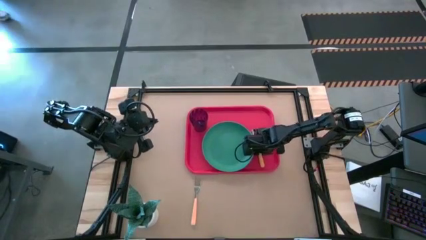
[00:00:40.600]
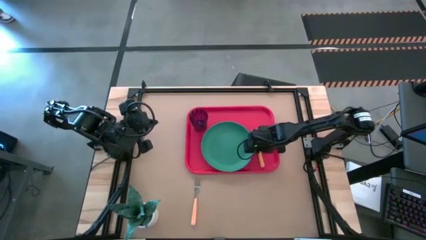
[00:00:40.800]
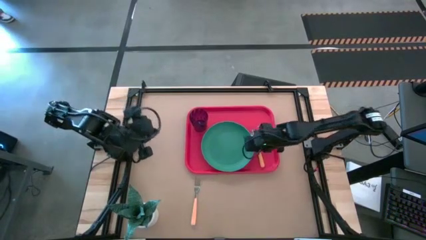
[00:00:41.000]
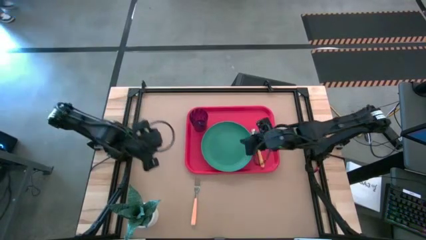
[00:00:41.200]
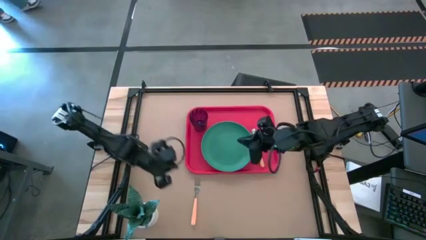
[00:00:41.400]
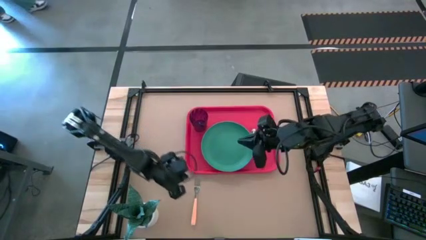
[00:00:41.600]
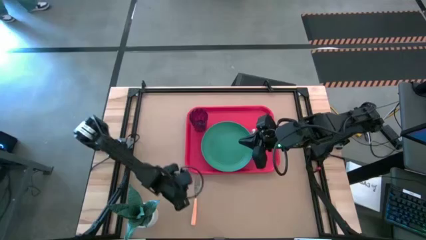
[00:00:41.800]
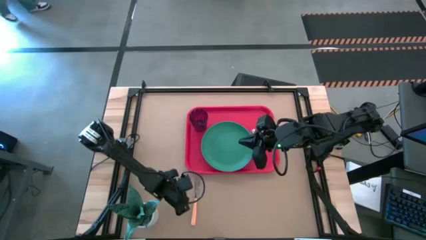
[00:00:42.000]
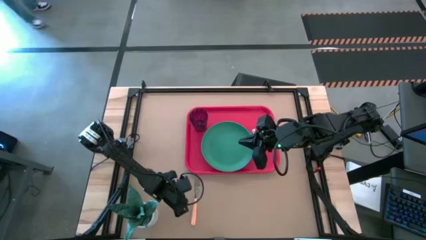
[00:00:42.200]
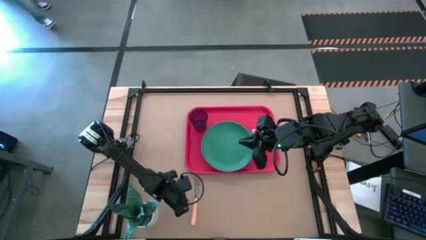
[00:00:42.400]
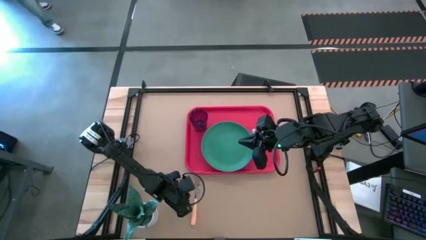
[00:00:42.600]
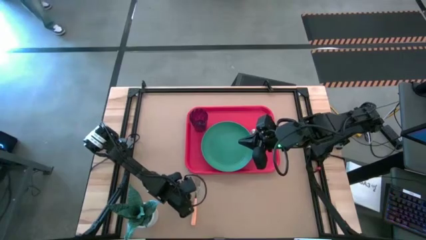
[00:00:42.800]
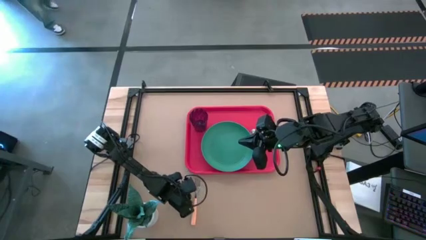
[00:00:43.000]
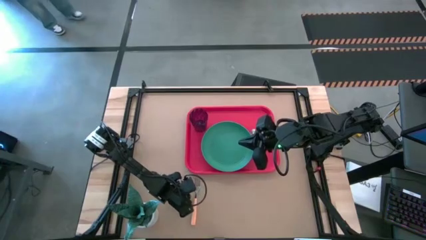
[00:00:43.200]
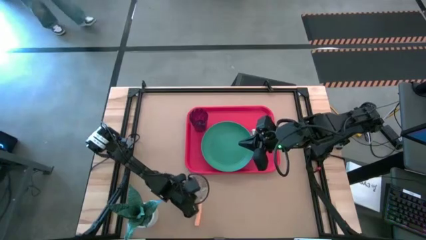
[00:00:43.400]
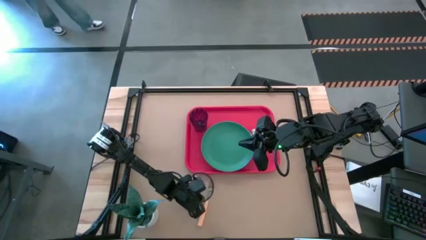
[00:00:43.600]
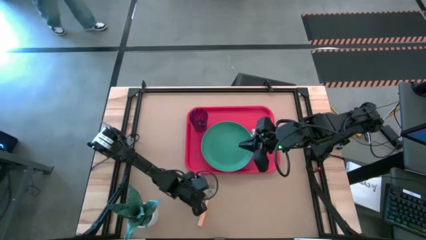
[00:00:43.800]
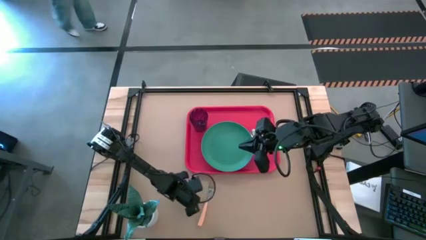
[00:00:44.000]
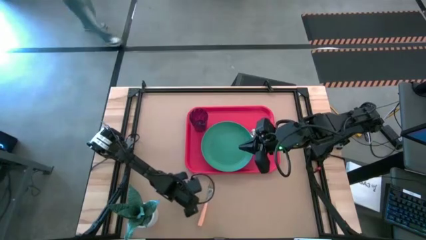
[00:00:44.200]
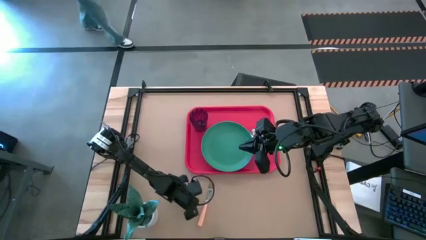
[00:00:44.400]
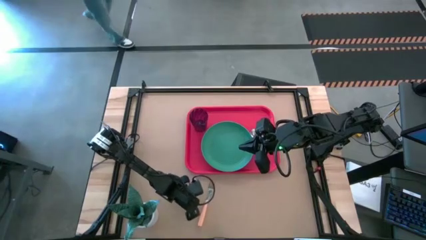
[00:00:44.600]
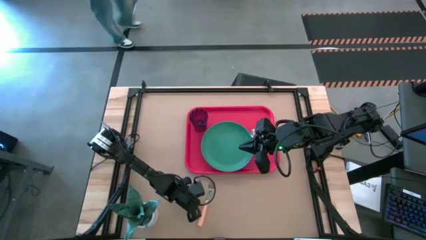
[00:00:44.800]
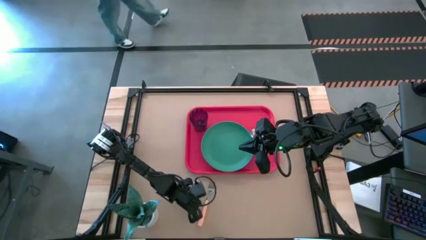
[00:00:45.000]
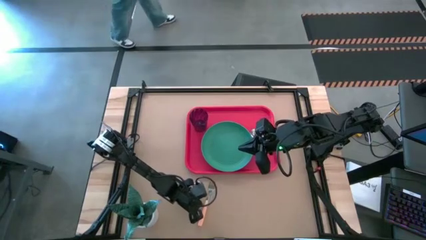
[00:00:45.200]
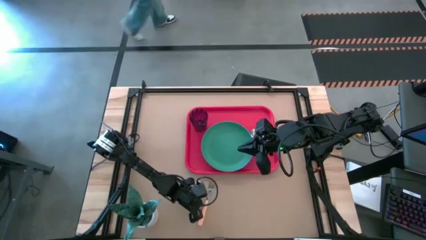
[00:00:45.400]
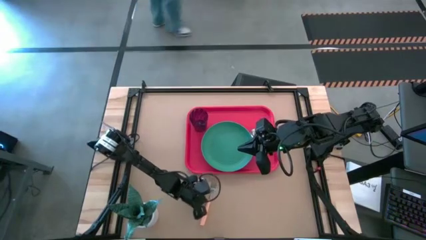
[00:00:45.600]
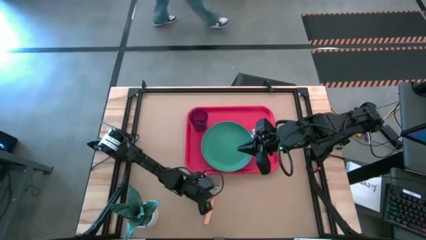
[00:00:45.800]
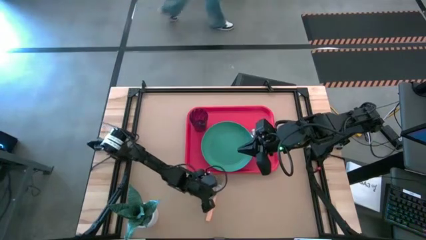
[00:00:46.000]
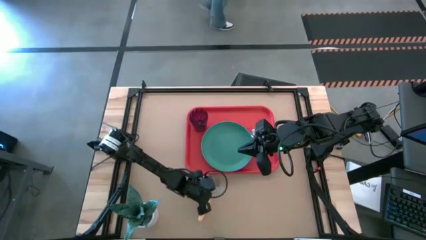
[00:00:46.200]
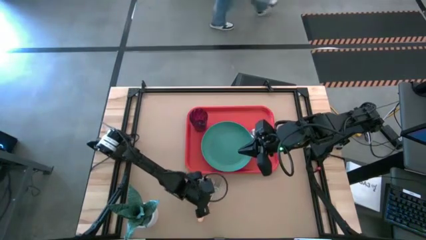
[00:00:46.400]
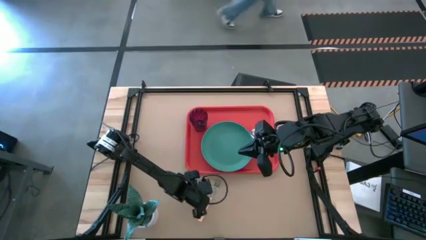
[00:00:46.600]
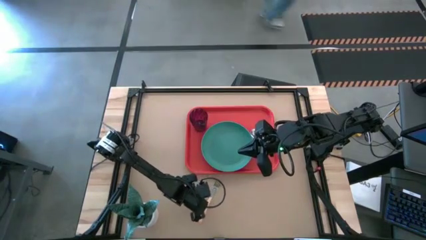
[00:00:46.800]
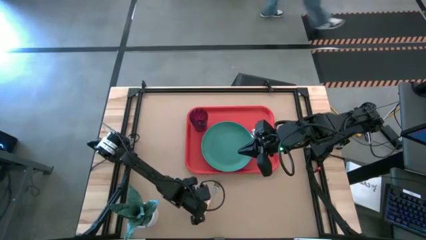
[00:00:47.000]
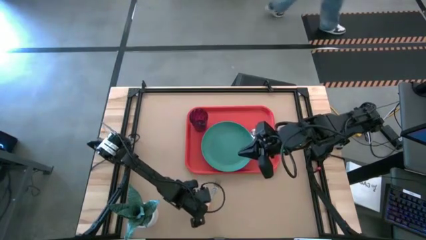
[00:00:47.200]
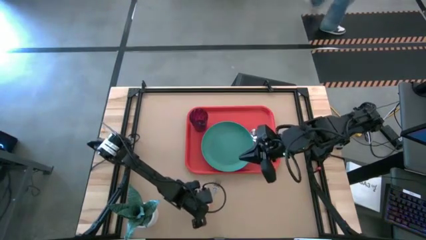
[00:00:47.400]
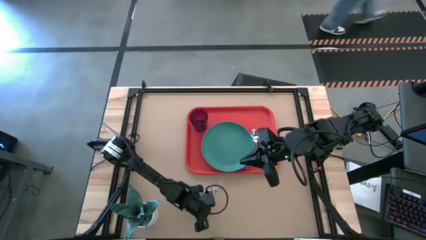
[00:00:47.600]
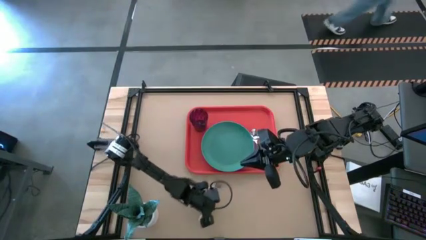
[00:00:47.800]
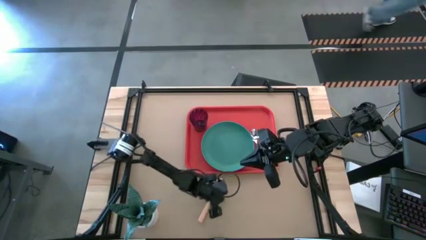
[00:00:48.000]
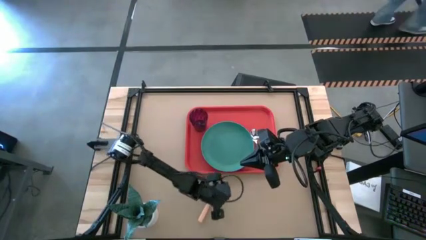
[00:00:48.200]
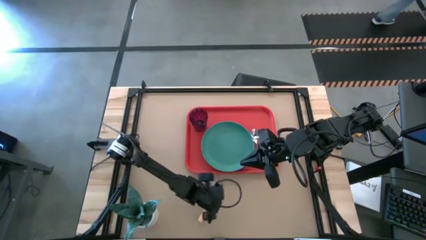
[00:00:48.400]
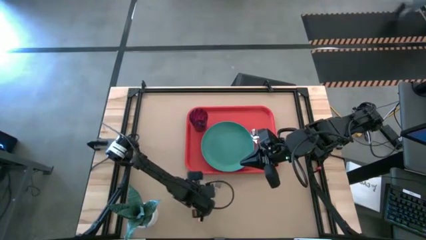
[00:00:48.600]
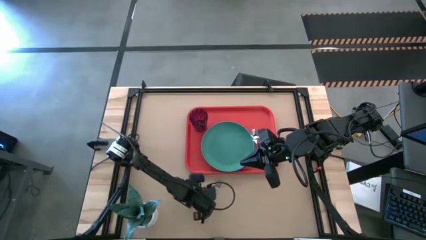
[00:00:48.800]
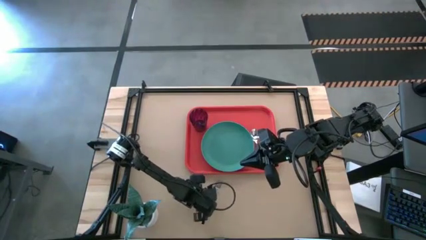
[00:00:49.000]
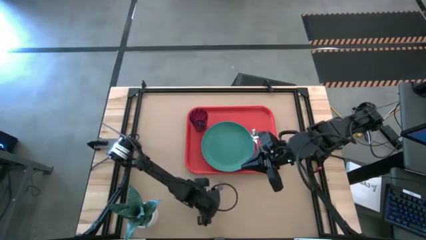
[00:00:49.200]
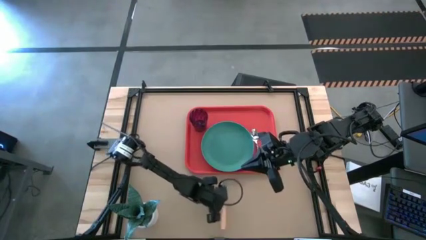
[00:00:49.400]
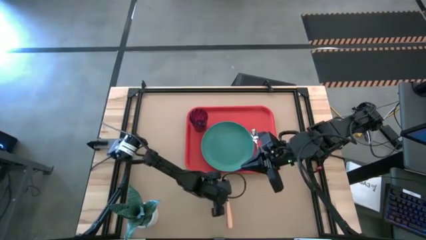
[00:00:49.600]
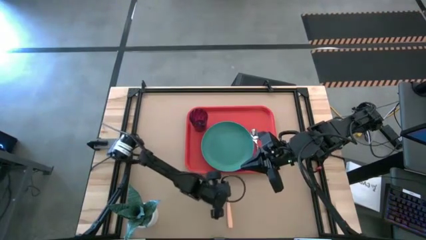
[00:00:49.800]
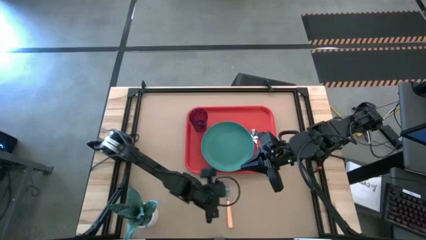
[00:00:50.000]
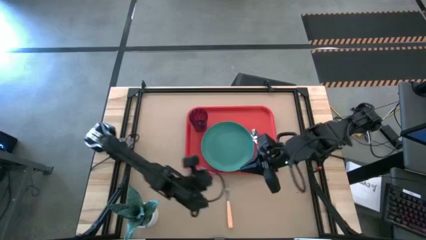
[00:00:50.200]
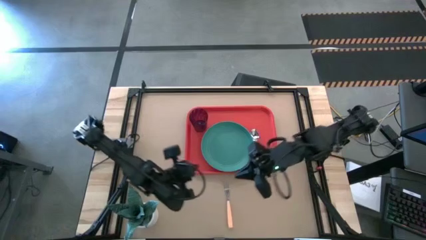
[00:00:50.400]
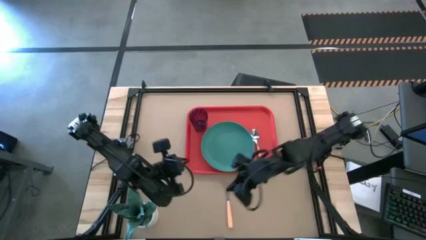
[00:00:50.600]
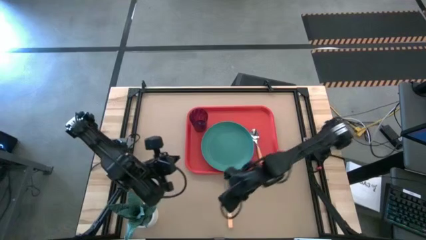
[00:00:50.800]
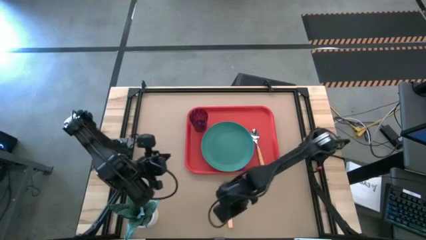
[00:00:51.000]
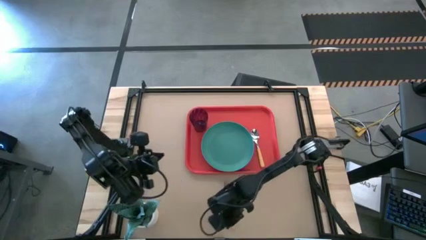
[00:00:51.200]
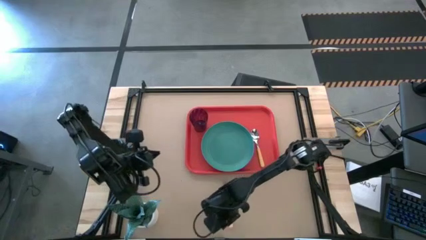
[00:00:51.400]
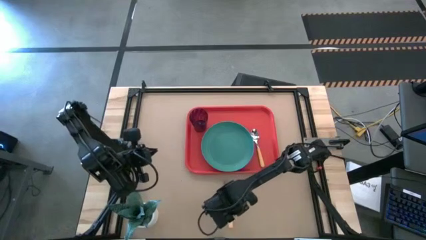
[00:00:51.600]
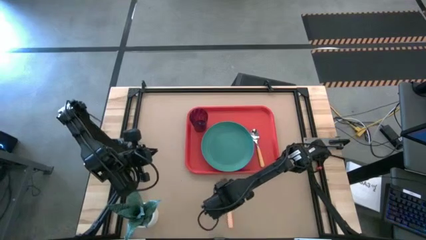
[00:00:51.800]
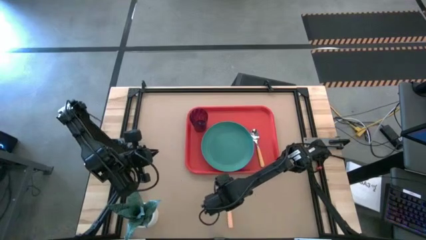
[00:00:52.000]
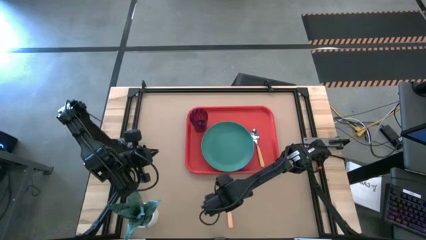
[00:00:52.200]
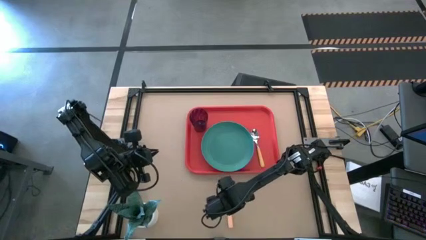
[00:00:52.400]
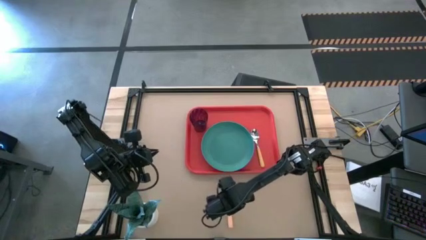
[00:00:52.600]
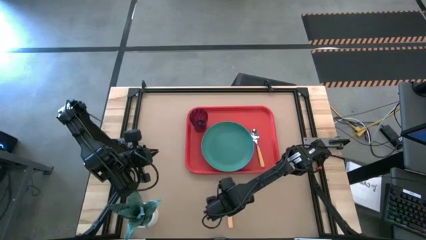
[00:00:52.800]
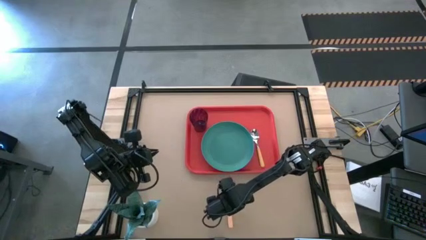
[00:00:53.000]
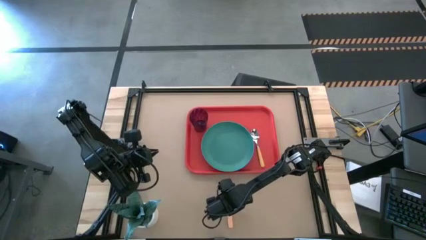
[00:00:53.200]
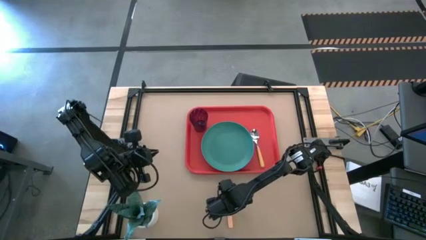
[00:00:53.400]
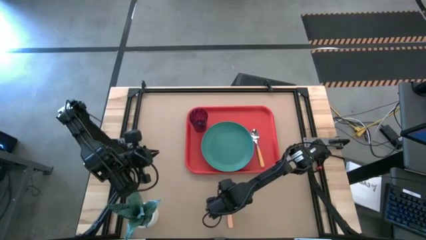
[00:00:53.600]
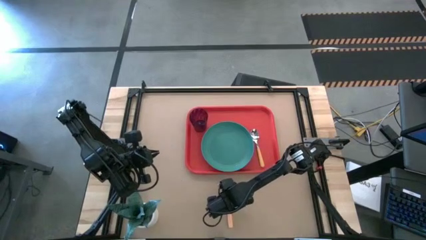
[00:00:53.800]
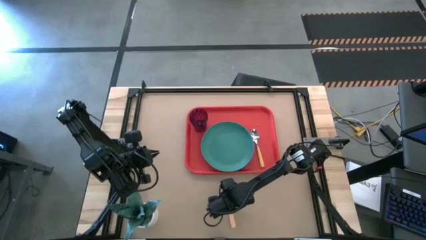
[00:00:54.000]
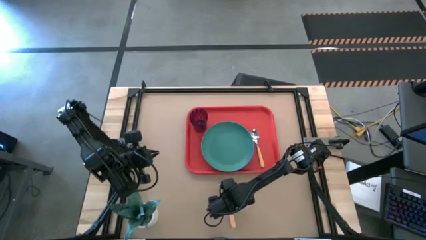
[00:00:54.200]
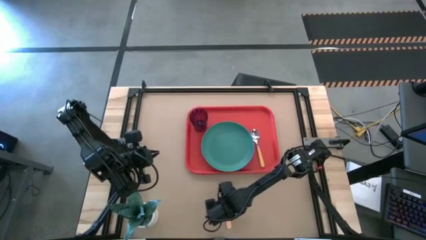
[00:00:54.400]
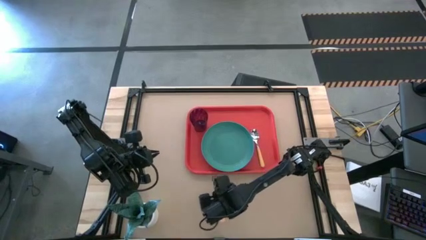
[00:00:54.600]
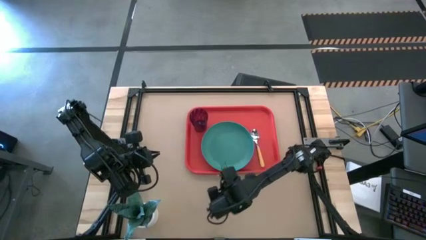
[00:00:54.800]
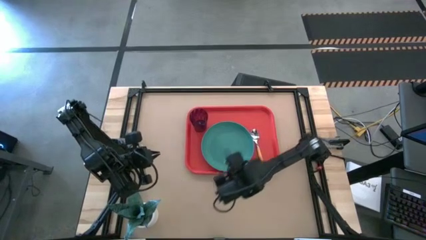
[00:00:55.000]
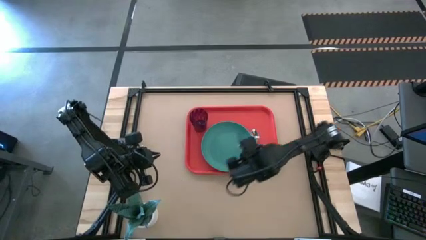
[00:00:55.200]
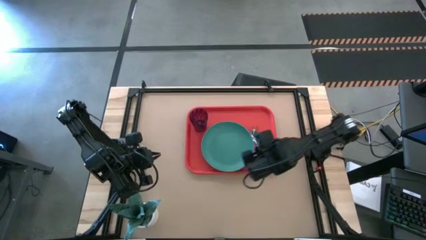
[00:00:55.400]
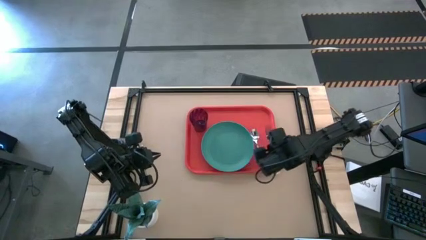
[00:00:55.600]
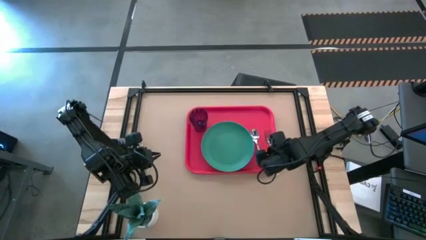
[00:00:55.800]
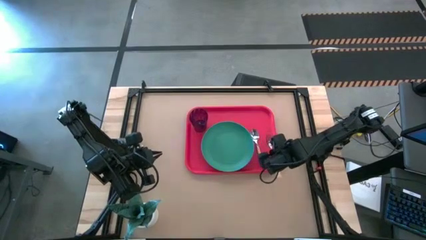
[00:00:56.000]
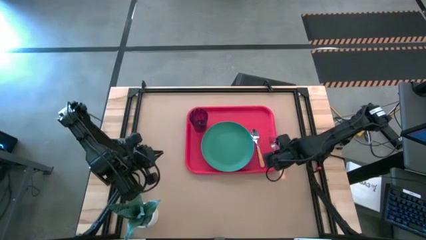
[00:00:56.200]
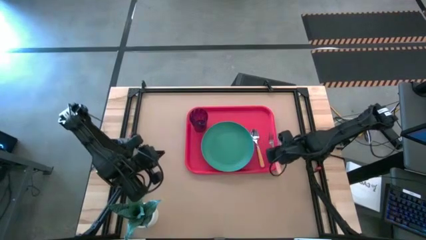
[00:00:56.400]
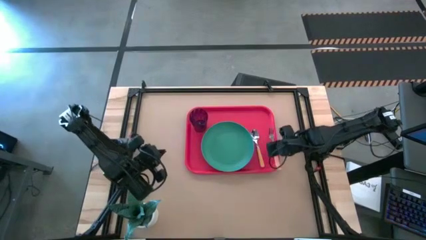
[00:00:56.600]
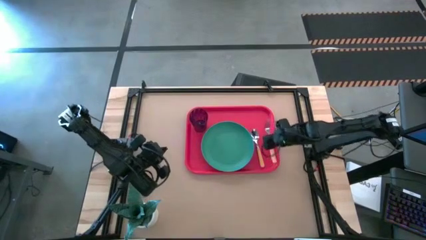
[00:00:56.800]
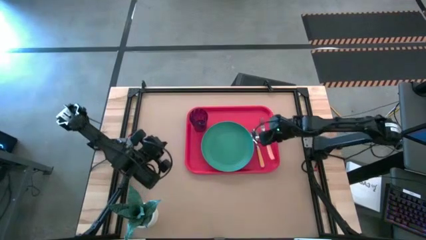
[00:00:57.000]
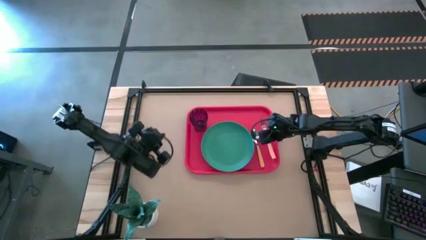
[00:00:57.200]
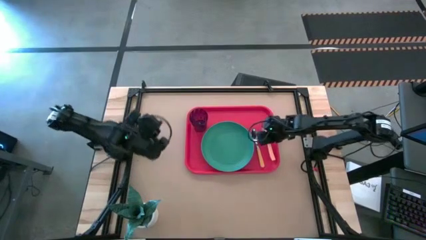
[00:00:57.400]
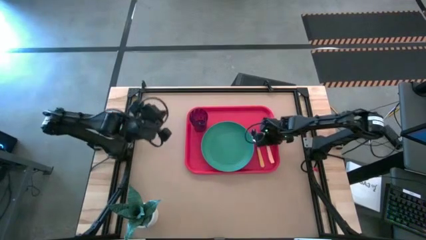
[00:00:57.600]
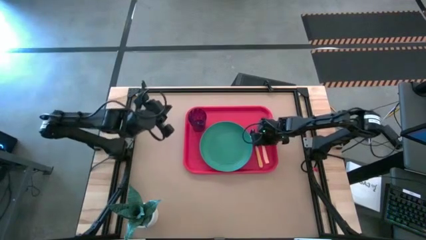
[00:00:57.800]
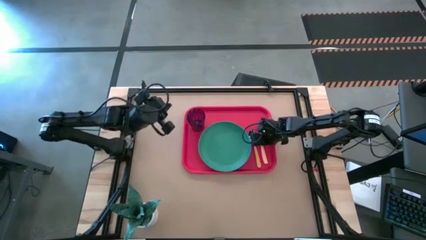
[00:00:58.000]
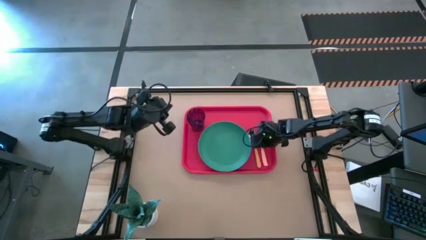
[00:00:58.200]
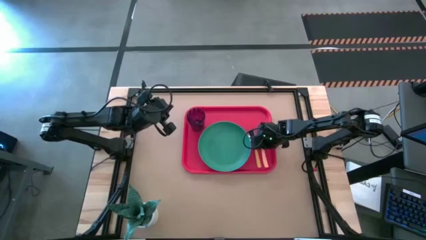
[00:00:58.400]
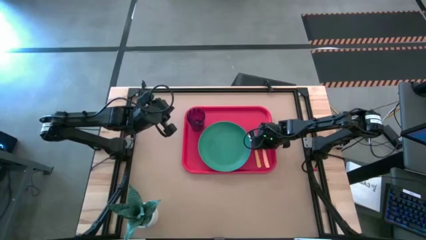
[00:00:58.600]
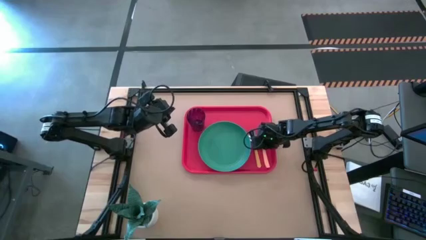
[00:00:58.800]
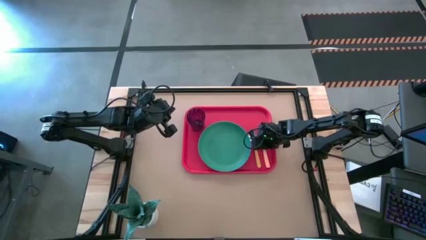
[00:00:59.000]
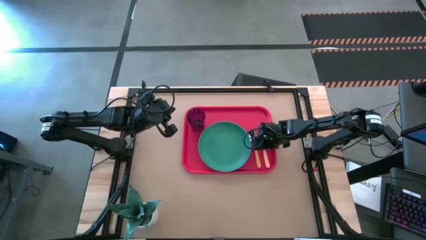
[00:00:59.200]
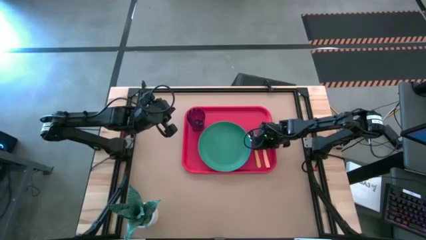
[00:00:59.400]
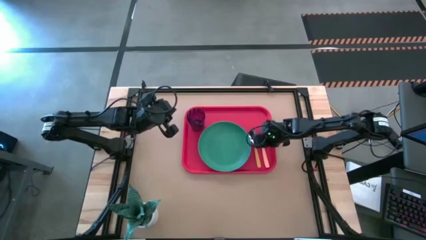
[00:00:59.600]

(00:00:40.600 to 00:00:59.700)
Task: Pick and place plate/cup/fork/spoon on tray
Put the orange fork beside the yellow spoon on the red tray
